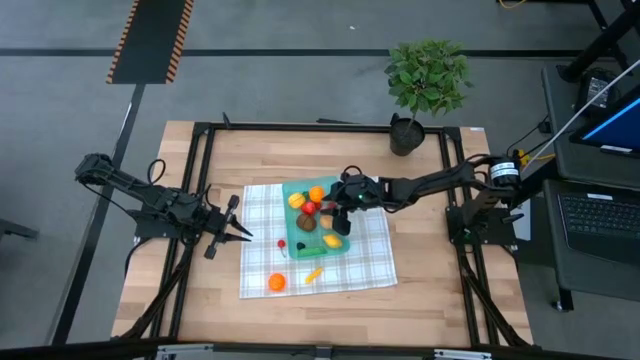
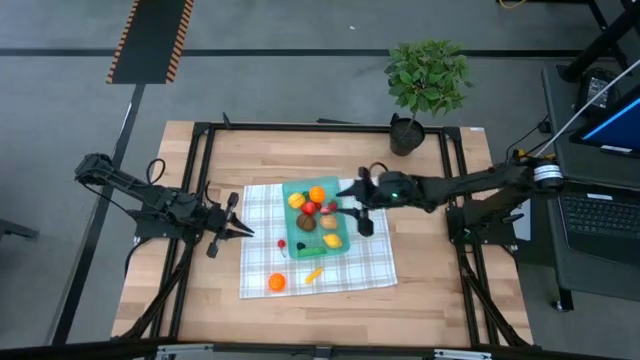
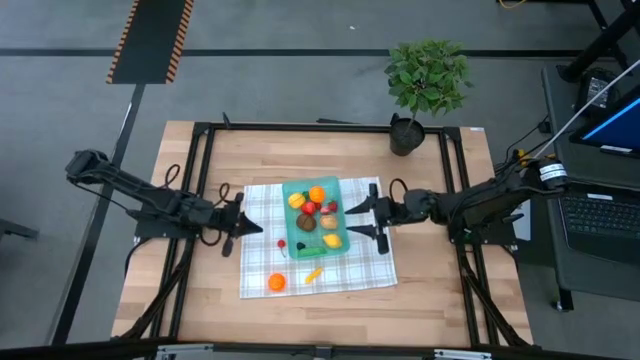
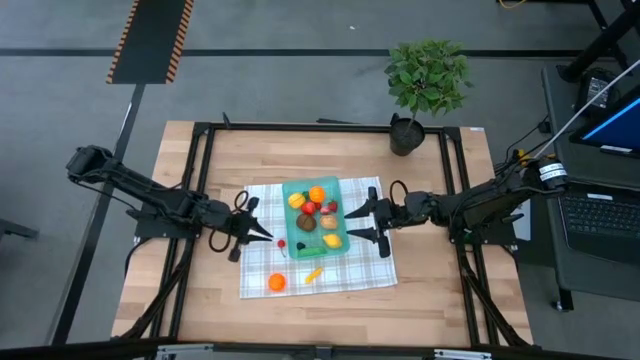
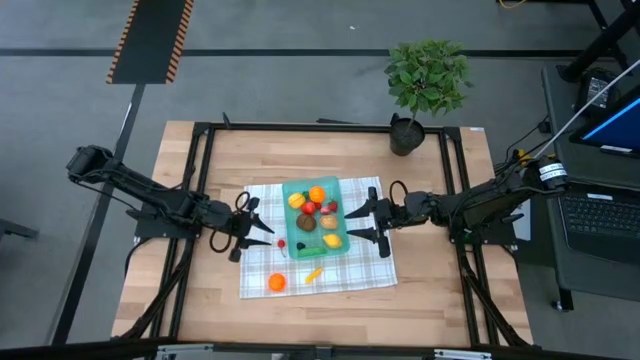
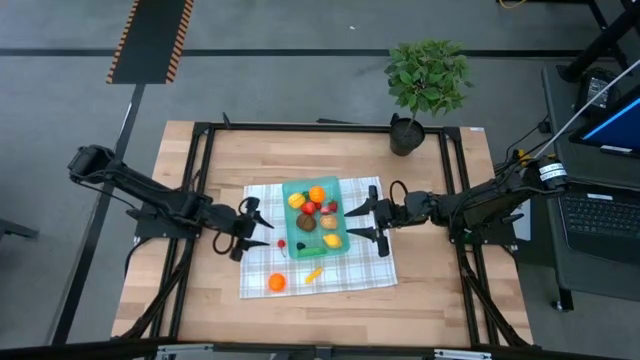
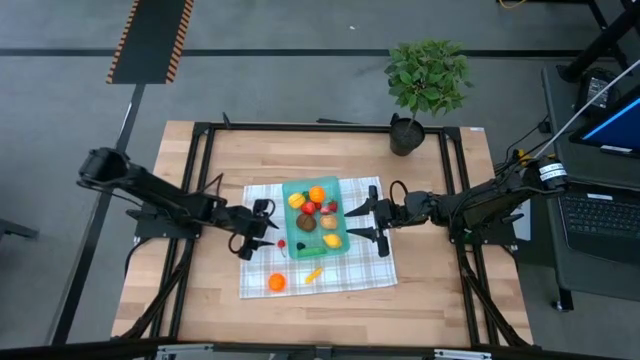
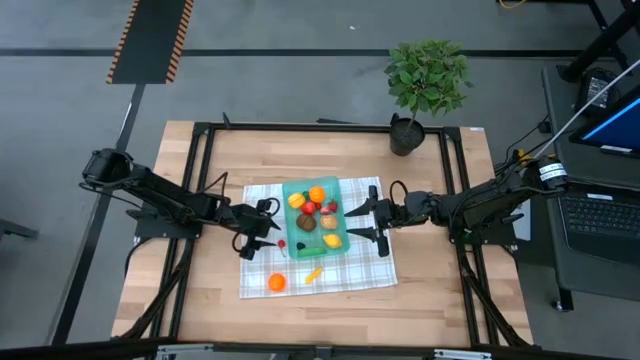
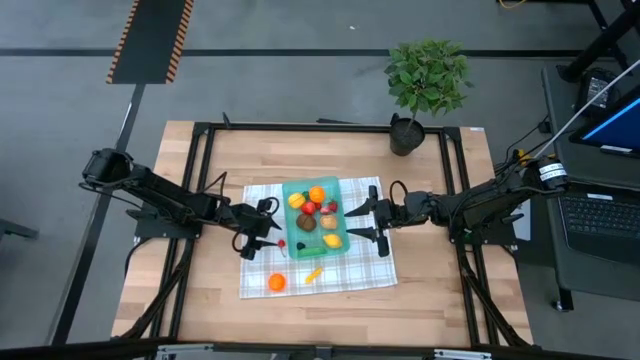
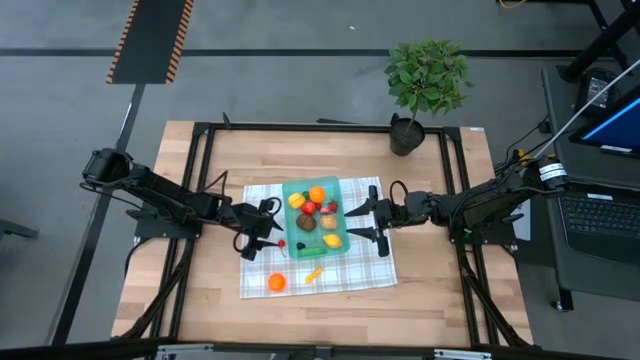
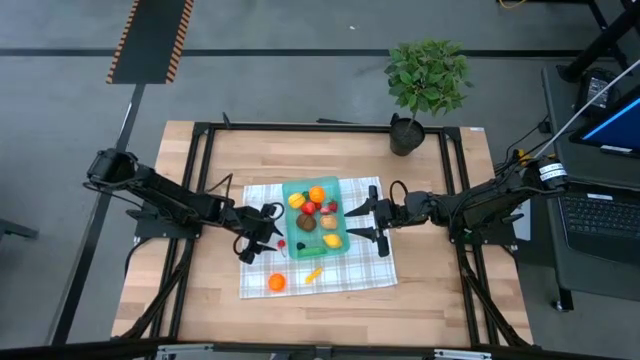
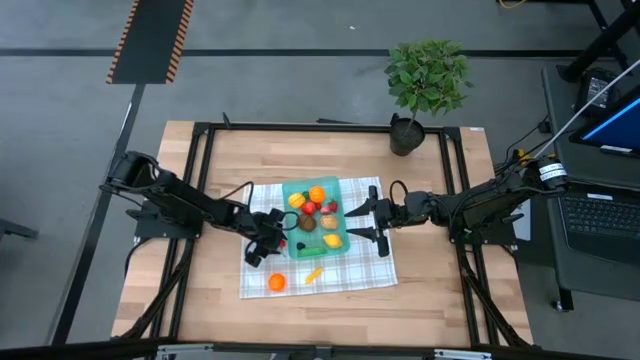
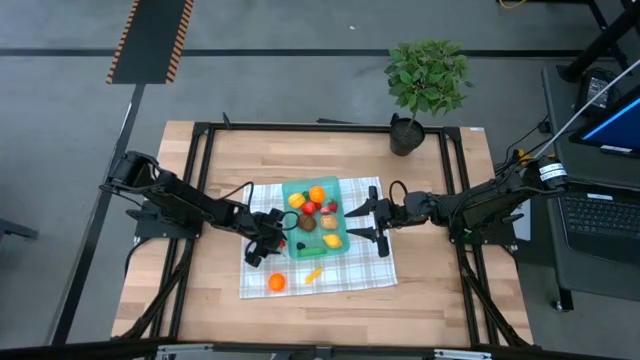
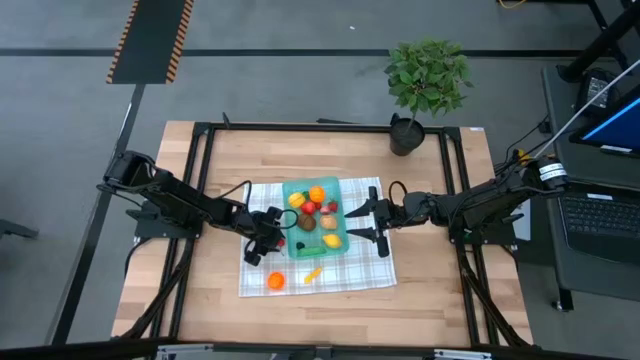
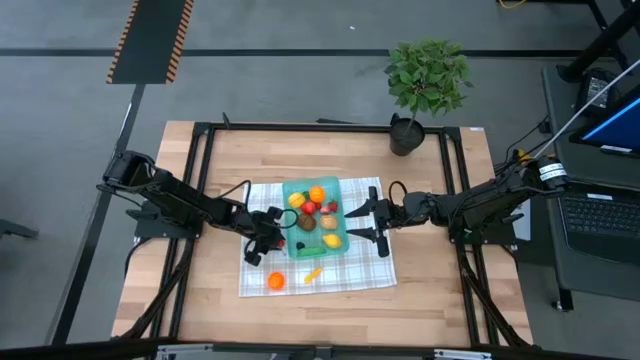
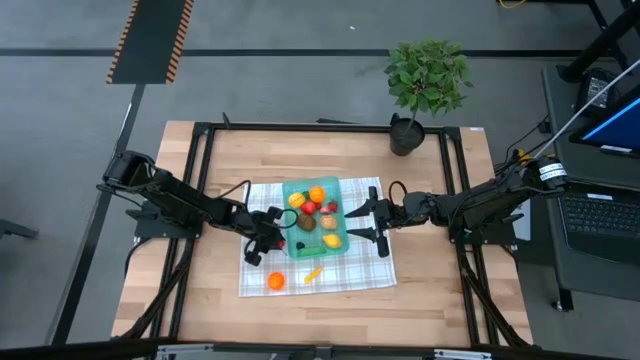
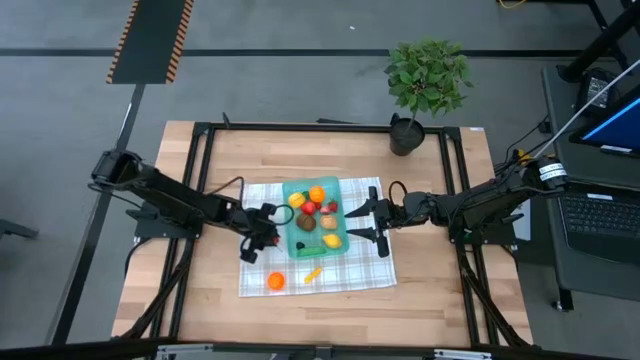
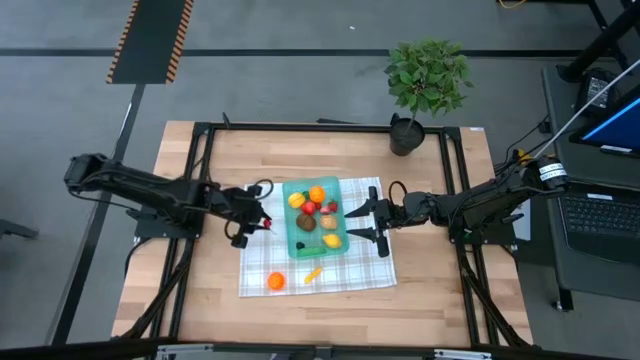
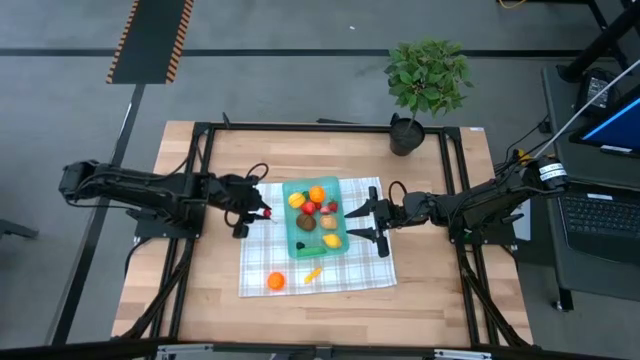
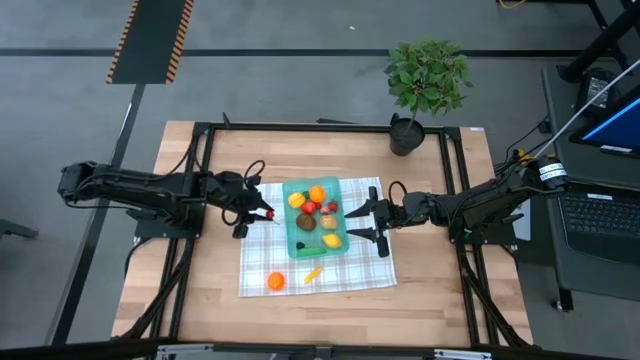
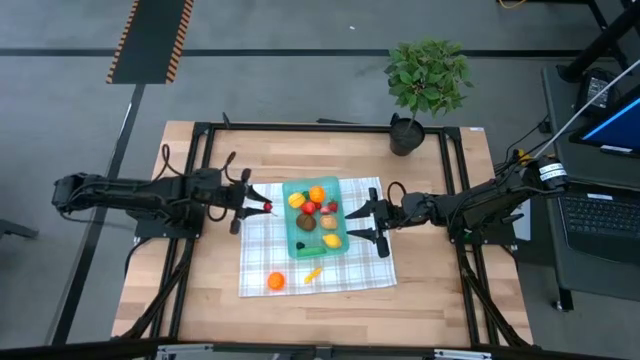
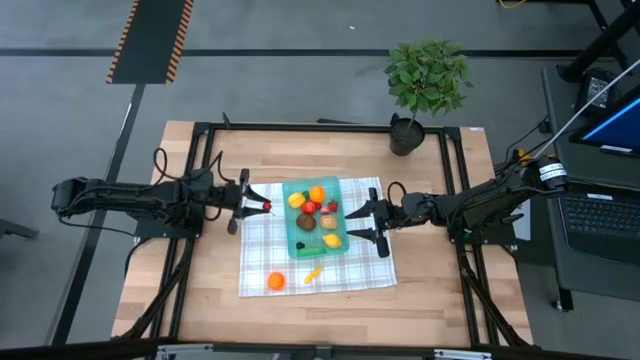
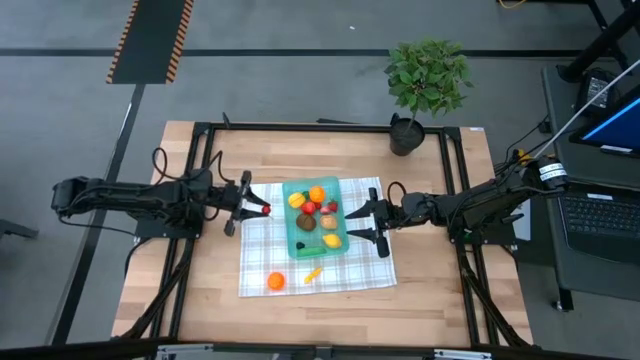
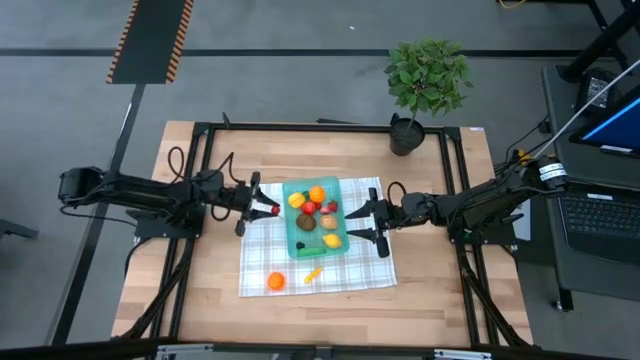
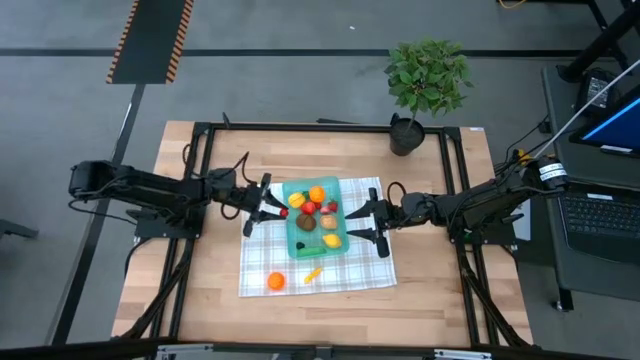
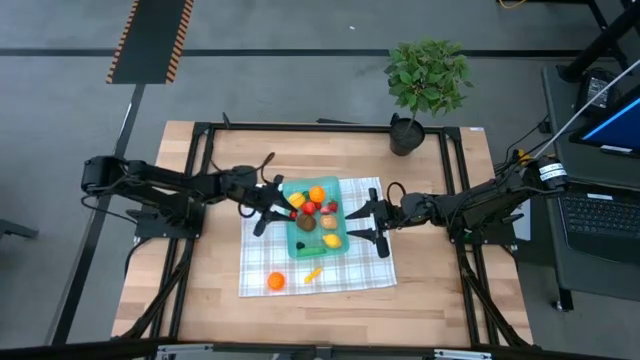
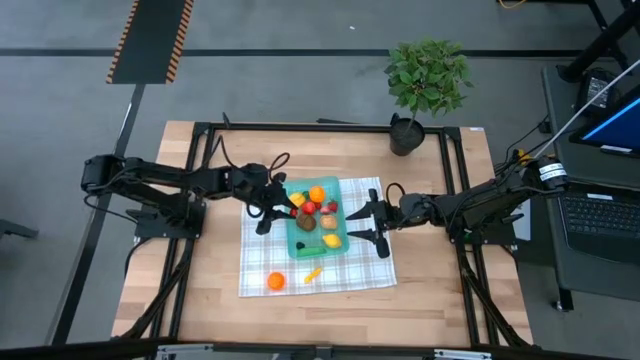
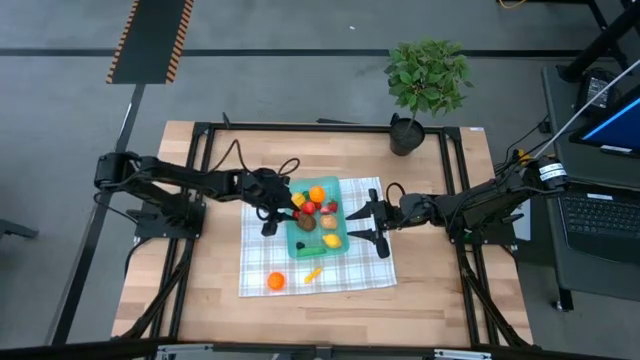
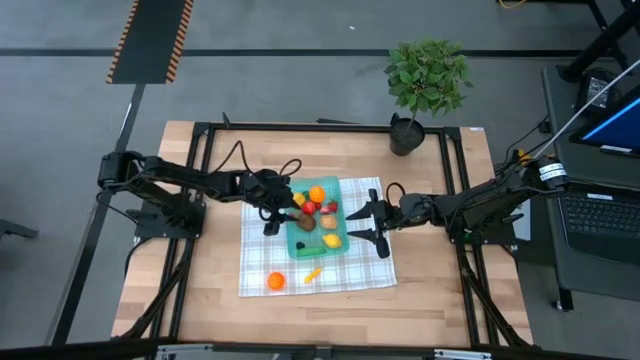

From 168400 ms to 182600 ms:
Task: Pick and placing Produce into tupperware
Put the cherry into the blue bin

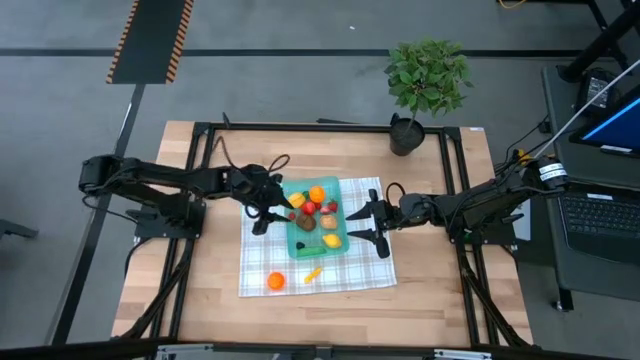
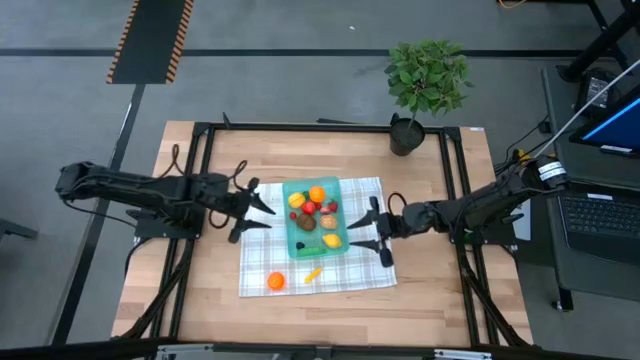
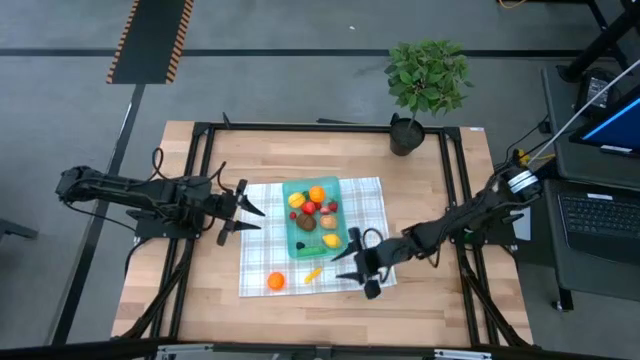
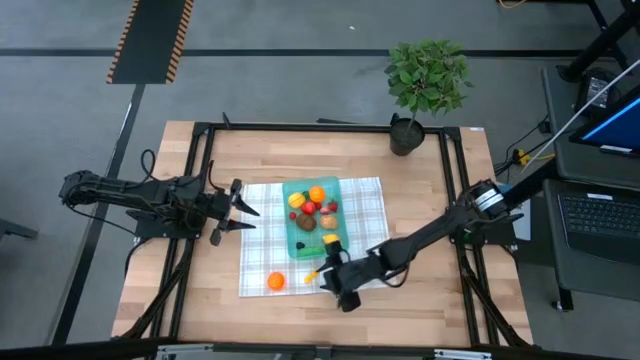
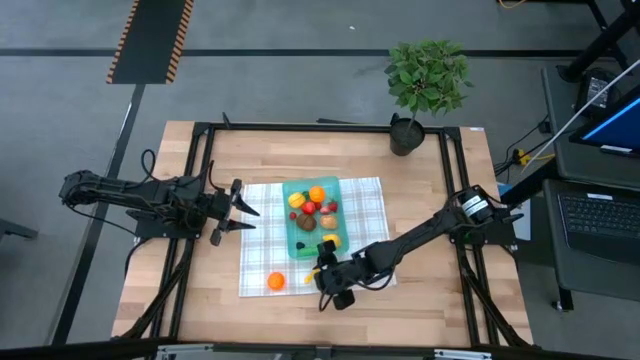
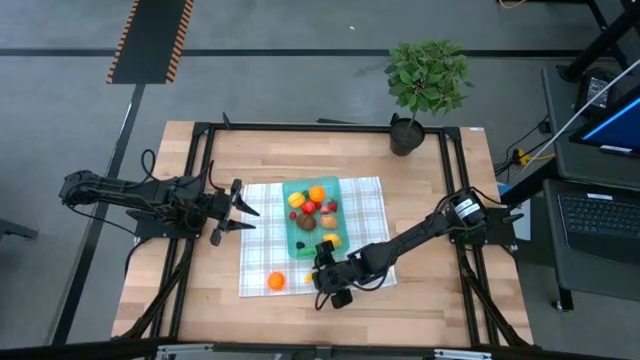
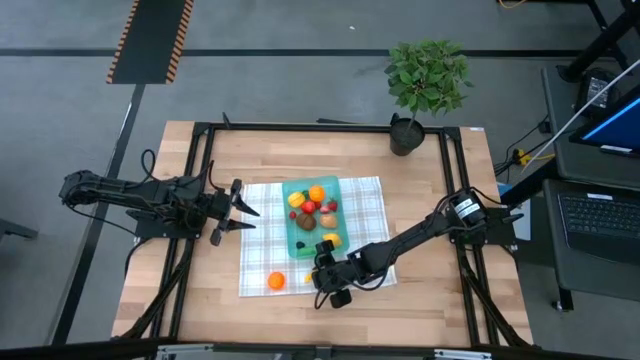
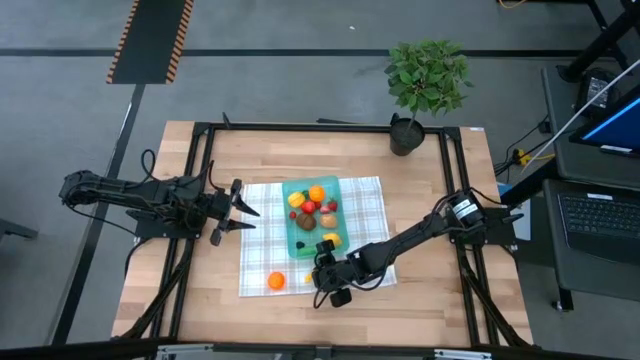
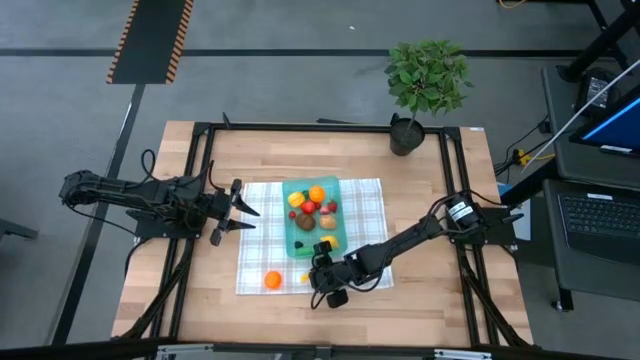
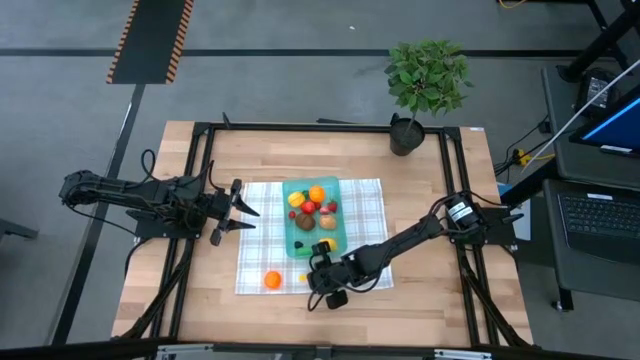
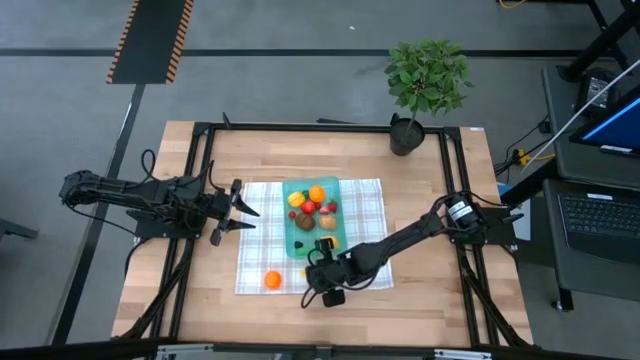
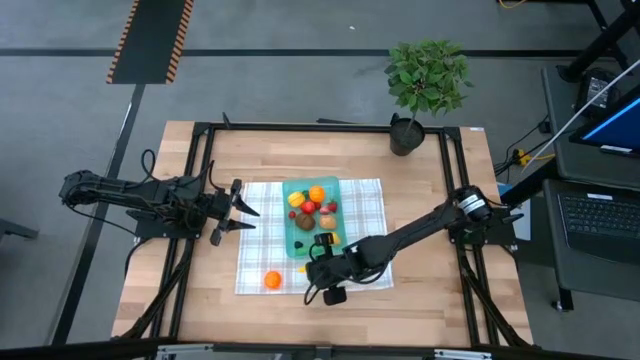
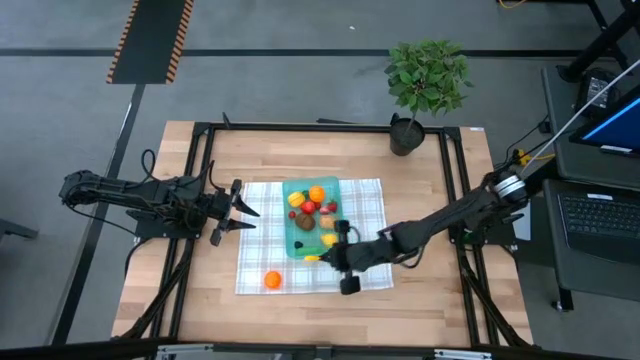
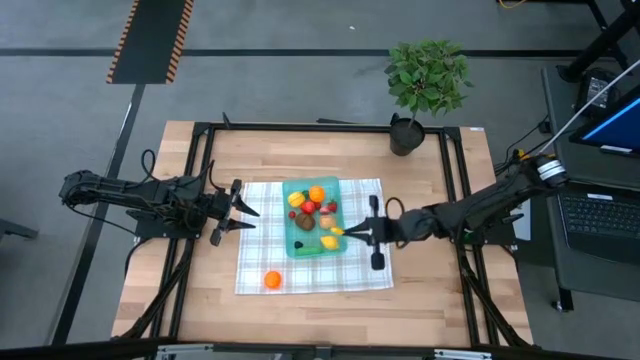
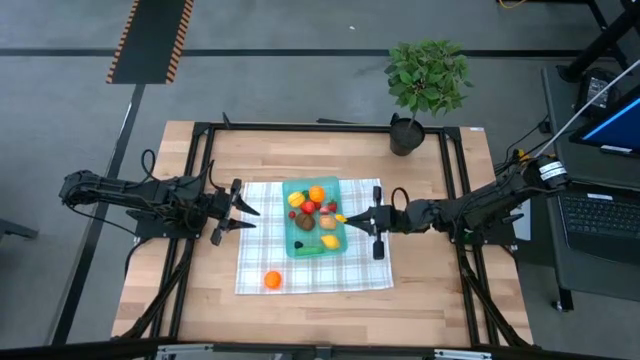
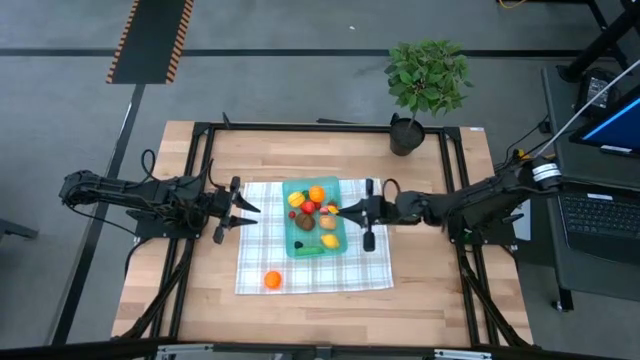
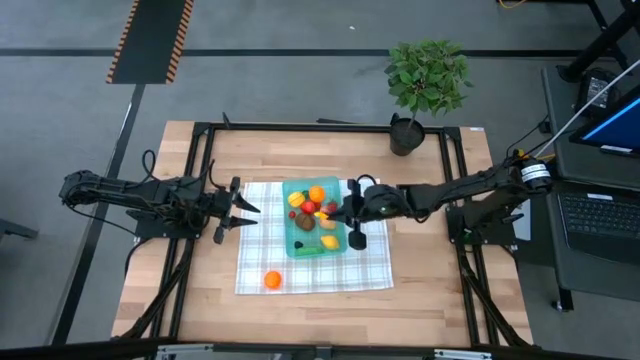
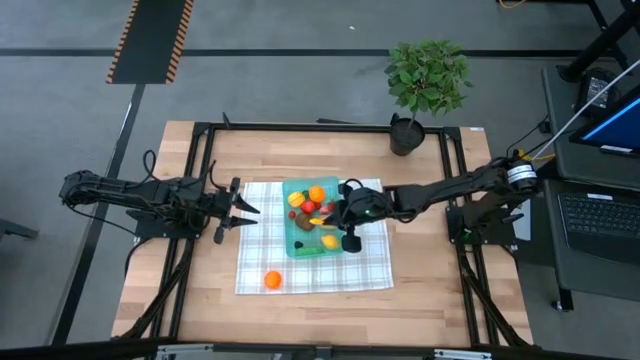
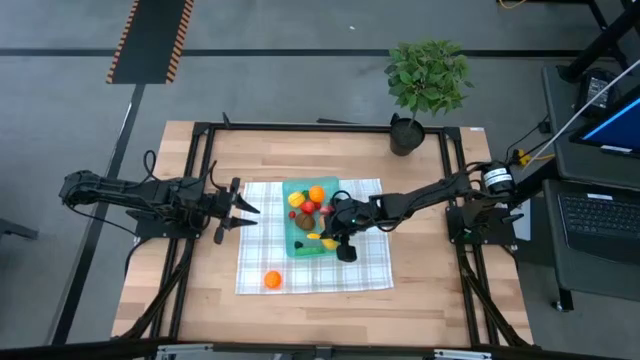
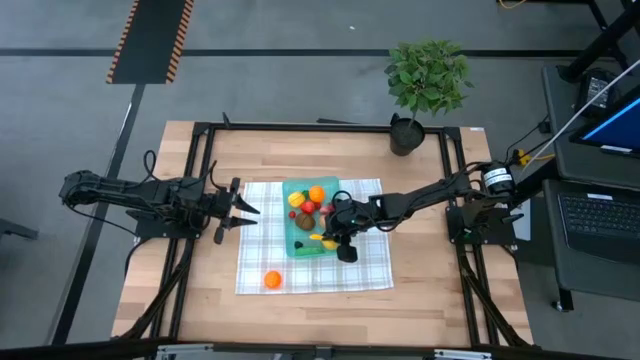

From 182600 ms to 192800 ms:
Put the chilli pepper into the blue bin
